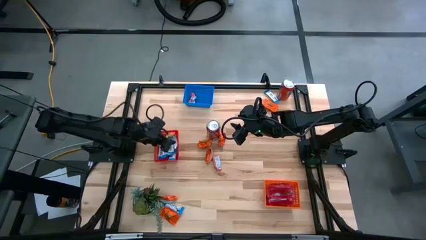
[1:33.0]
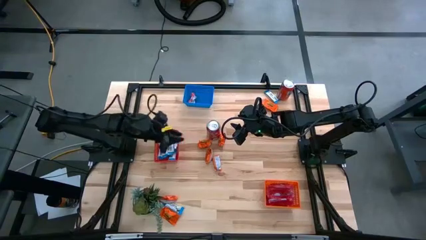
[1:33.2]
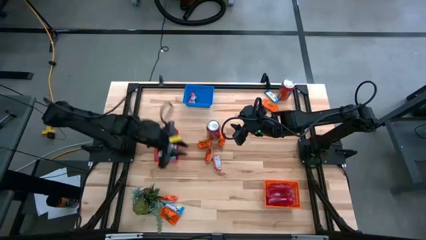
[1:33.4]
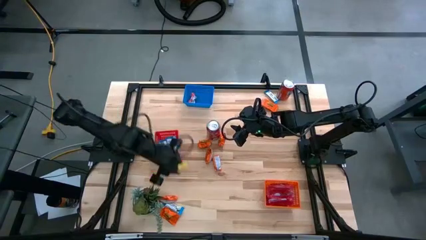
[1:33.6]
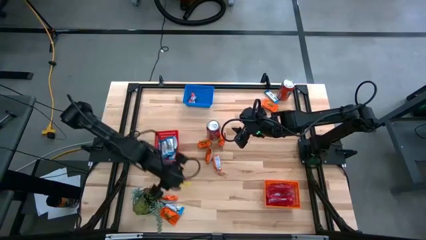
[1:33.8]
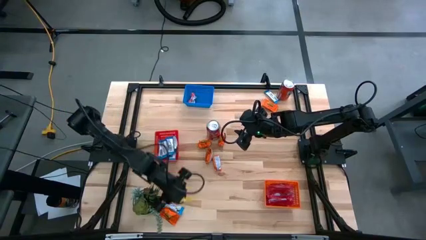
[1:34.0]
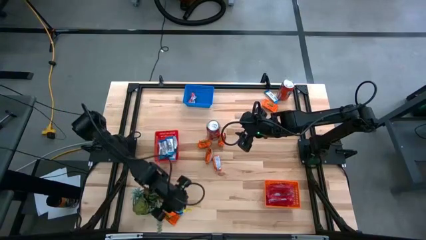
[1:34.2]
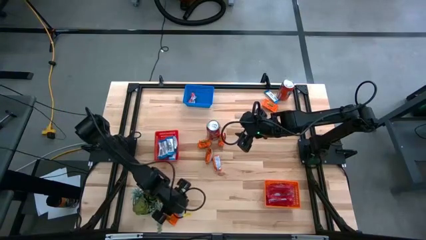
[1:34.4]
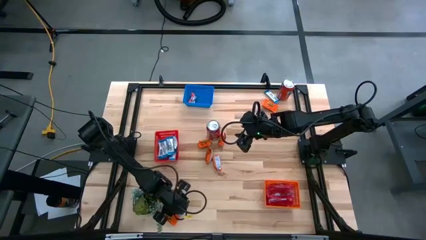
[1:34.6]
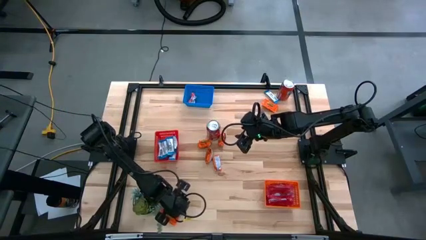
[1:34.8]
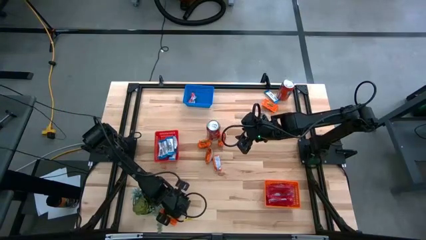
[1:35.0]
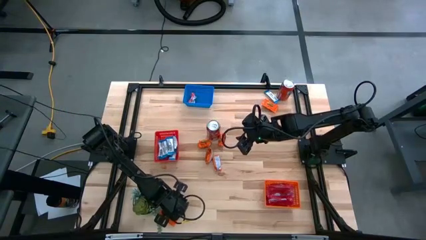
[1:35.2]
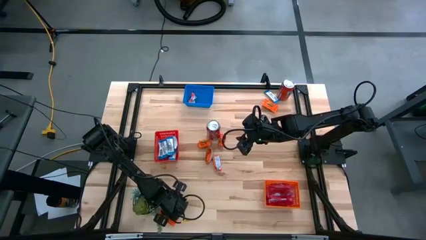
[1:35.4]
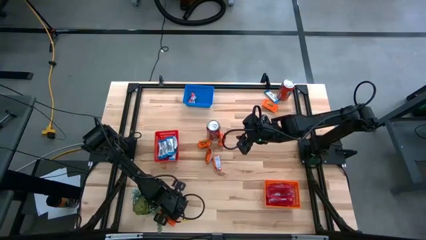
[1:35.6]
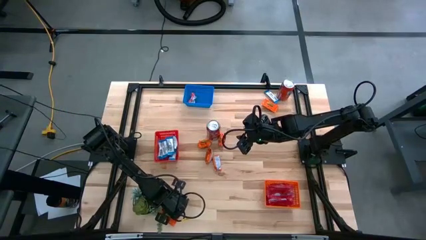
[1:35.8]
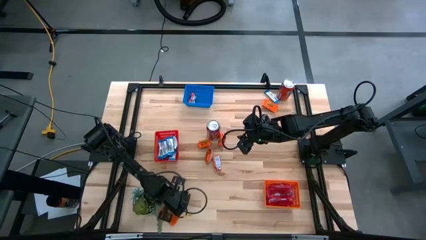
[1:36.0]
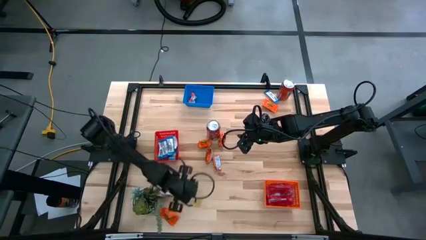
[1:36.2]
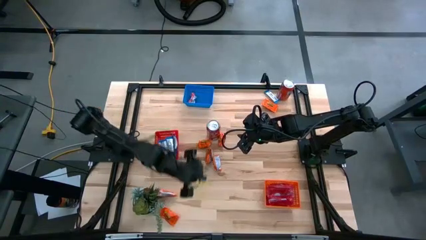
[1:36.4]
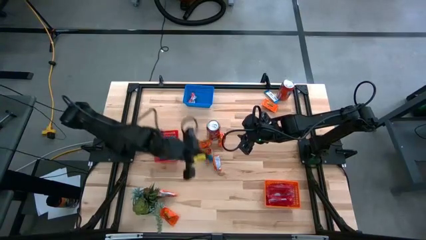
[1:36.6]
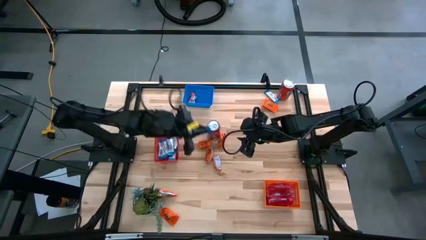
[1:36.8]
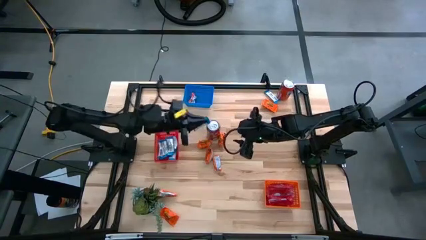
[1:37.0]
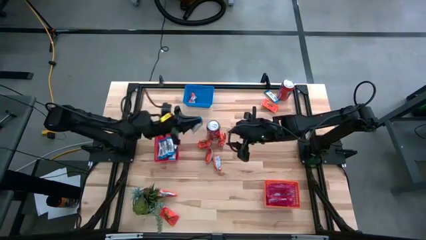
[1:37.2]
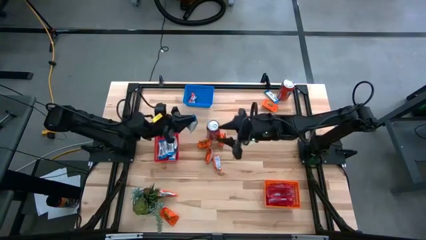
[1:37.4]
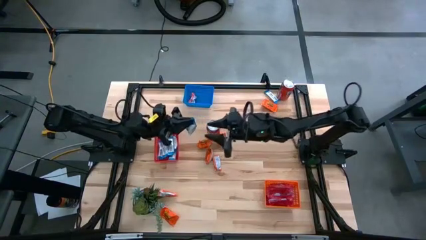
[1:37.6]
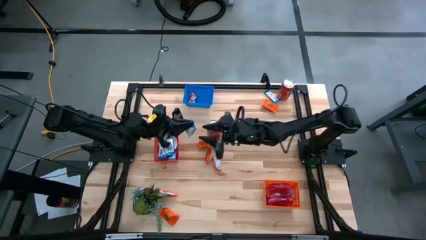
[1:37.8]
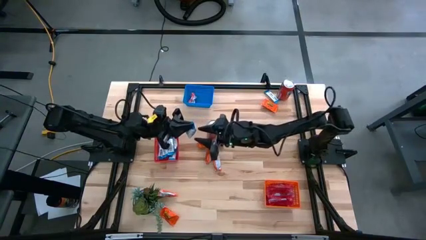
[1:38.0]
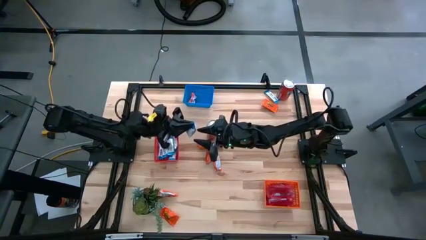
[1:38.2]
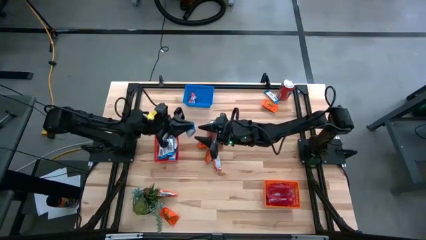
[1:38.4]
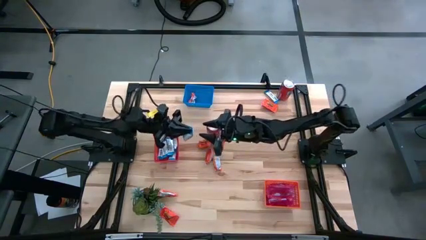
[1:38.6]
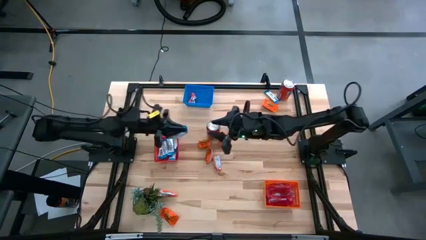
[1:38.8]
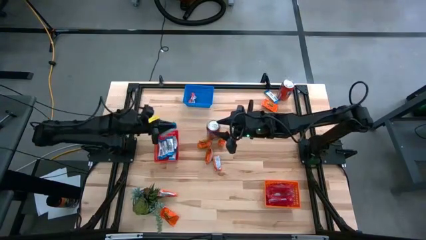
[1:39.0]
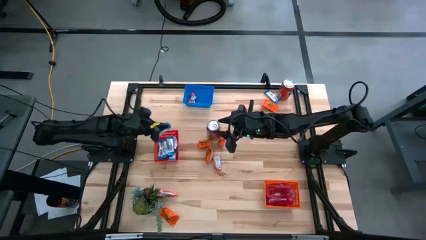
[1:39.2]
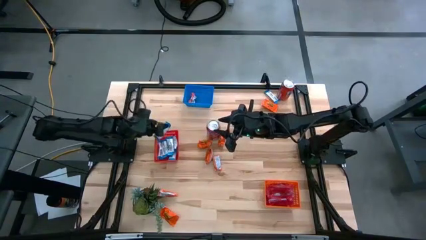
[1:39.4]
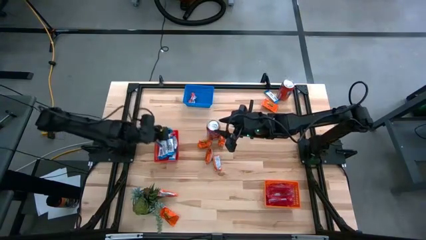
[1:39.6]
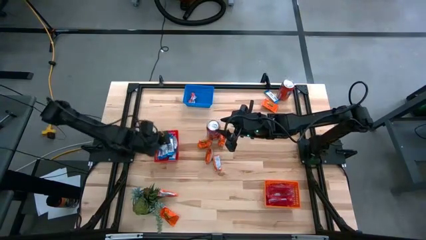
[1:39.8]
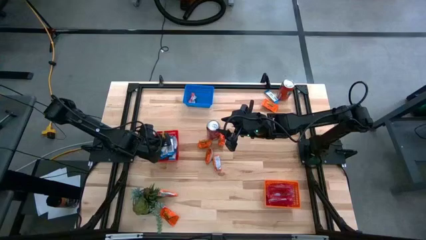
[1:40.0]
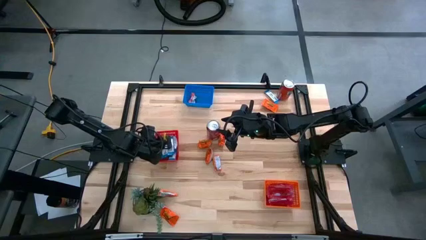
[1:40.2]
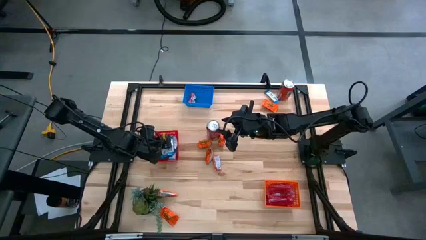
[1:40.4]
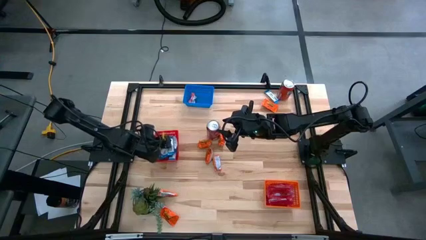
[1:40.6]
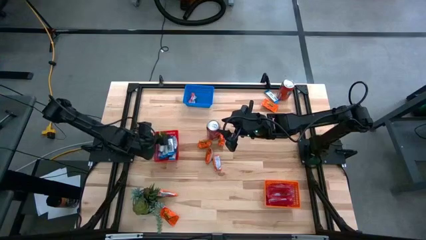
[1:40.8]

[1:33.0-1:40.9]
Task: Sort candy
Put the white chocolate into the red bin

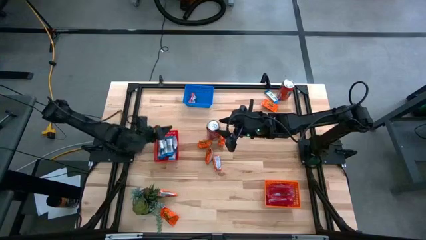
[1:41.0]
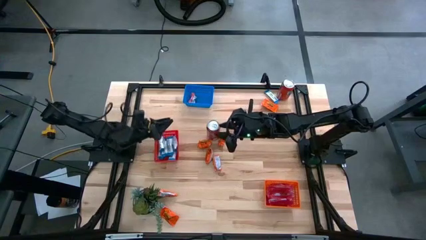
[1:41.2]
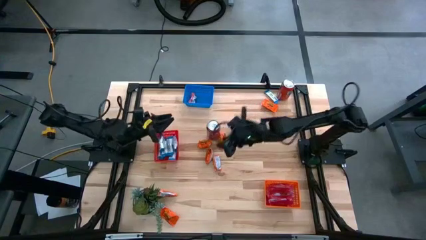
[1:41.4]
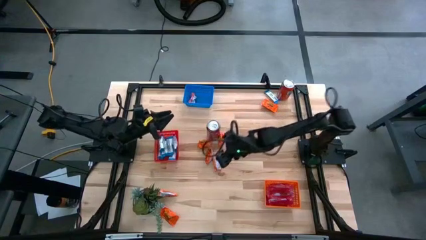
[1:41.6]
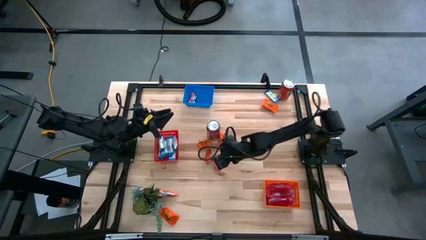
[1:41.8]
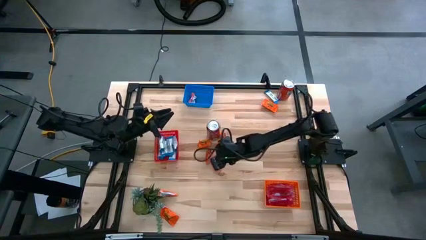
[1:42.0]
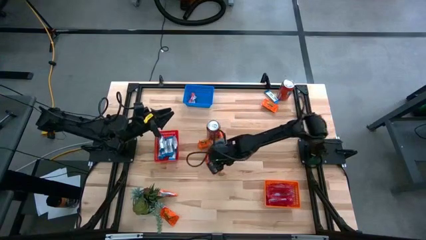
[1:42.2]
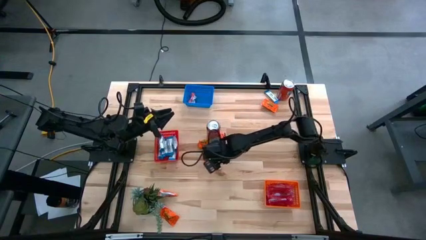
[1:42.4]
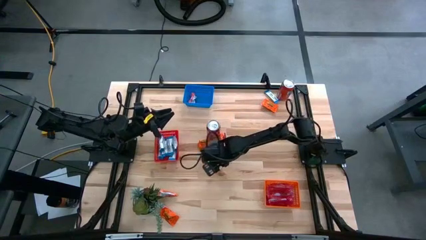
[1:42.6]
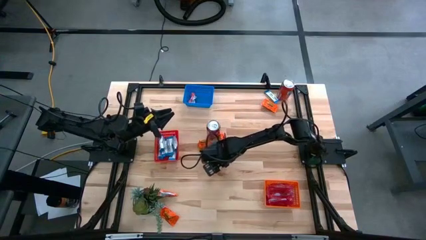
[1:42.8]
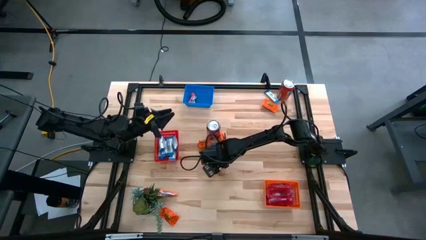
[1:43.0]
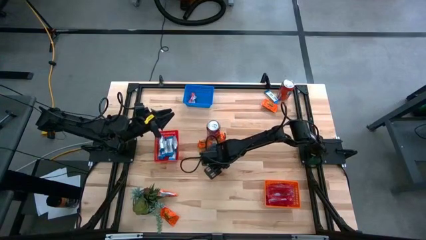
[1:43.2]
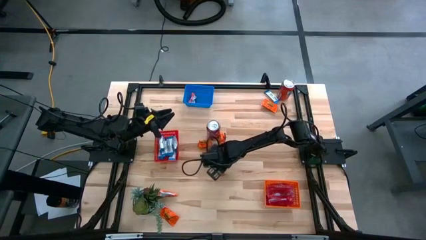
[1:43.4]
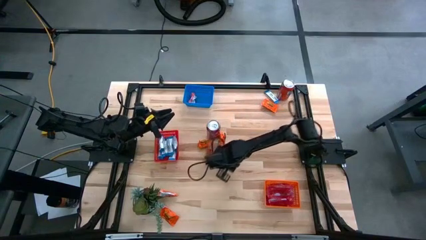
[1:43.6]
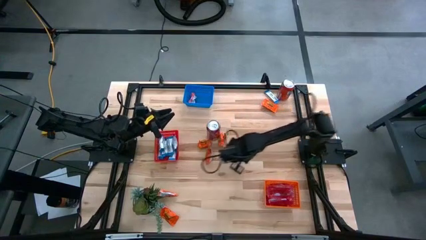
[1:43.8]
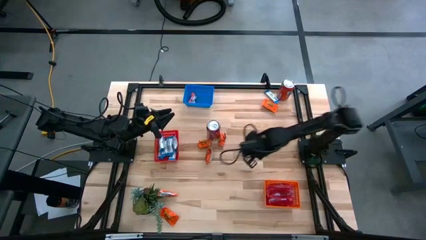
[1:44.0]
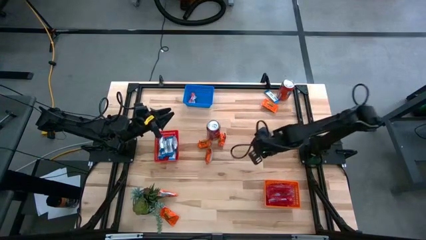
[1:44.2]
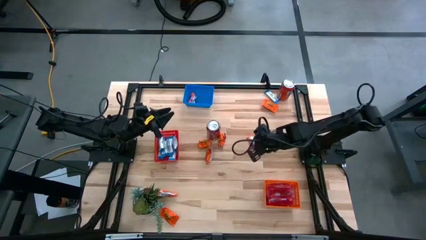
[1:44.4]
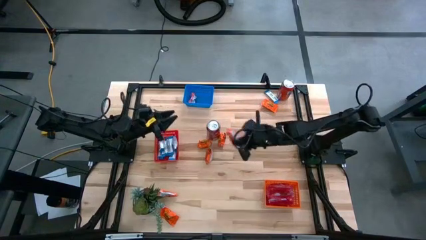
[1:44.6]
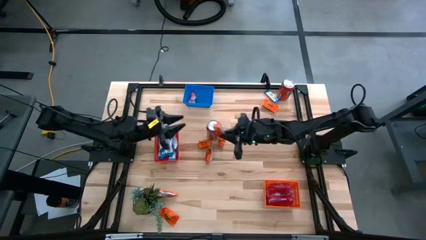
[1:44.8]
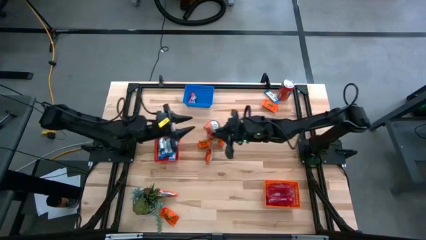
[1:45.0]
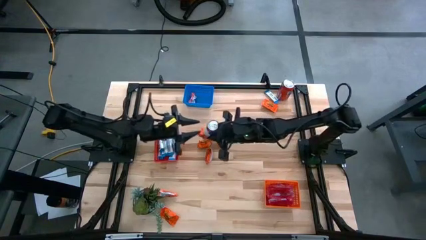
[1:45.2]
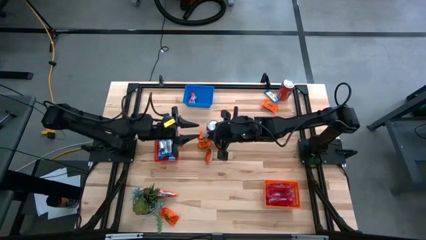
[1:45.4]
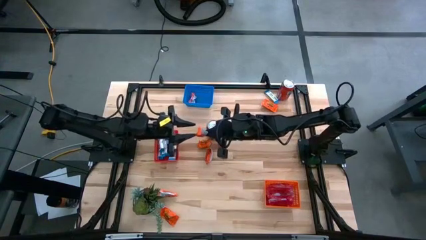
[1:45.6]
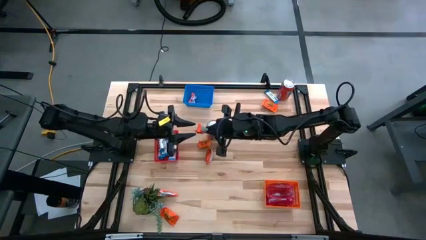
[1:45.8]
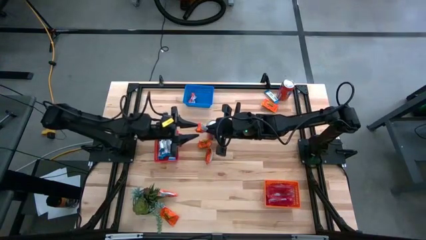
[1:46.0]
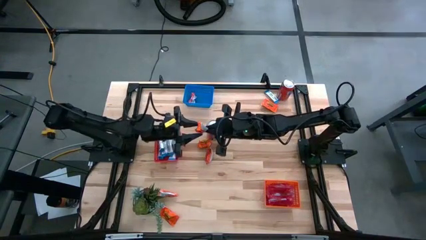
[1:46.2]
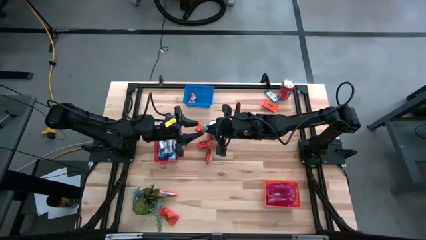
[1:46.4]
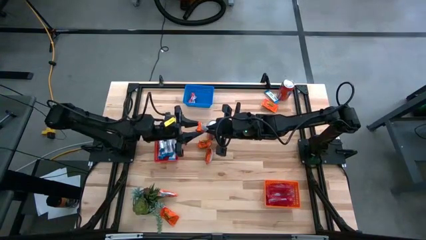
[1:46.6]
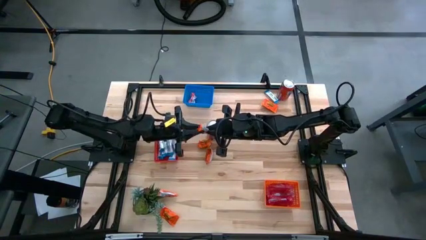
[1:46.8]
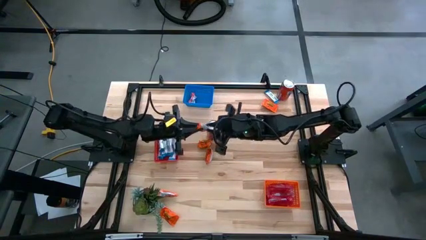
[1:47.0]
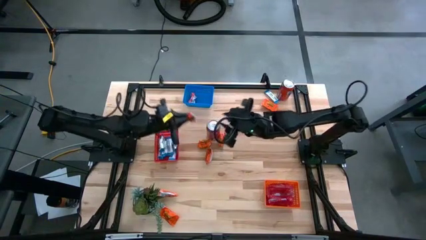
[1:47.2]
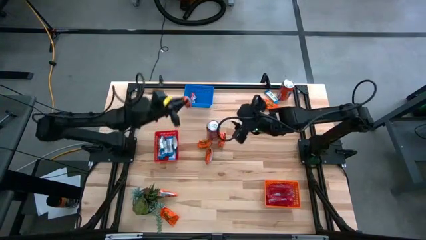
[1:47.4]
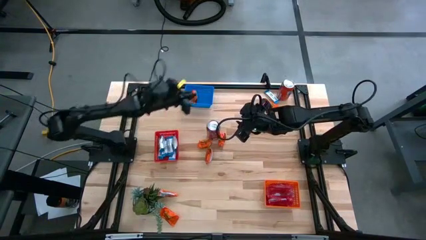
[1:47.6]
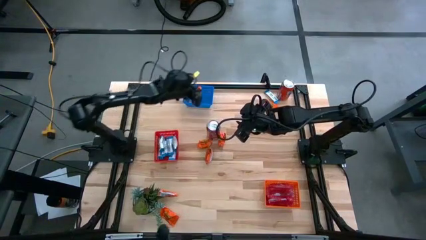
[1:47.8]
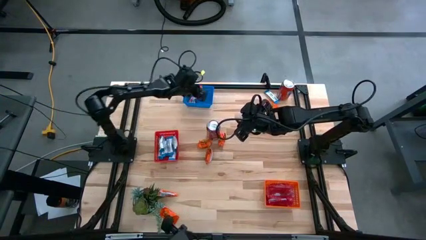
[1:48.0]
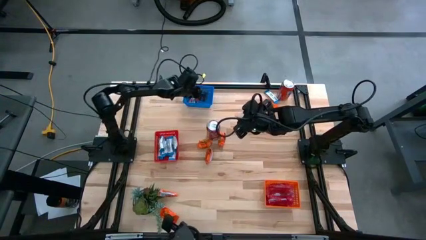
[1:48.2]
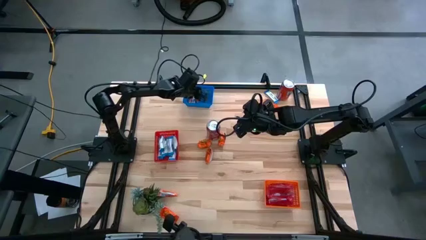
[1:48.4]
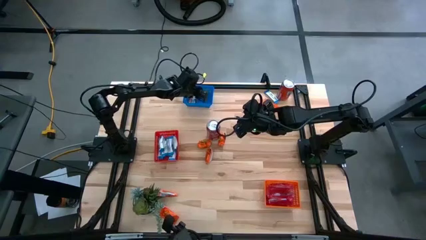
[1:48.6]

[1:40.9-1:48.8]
Put the orange chocolate into the blue bin
